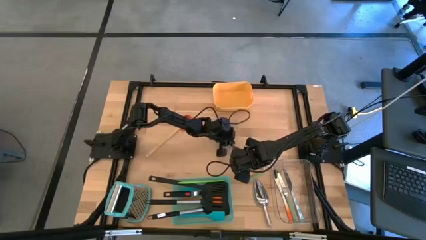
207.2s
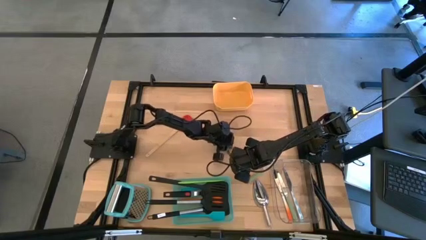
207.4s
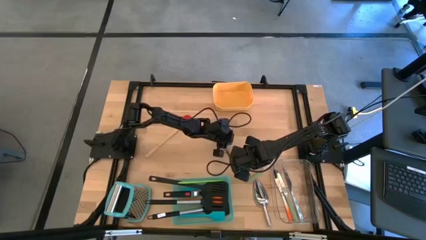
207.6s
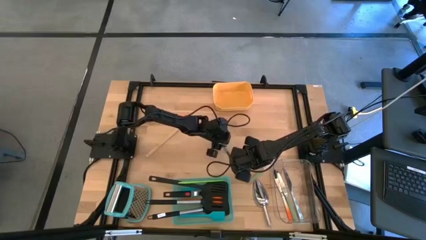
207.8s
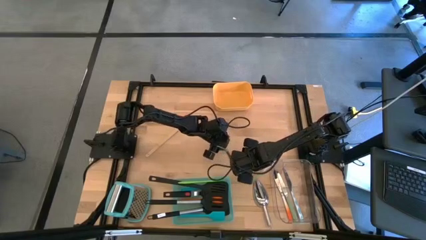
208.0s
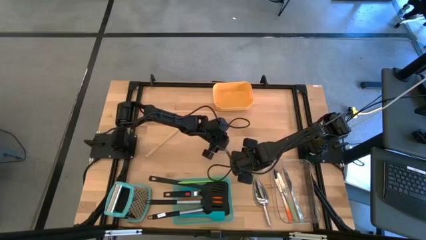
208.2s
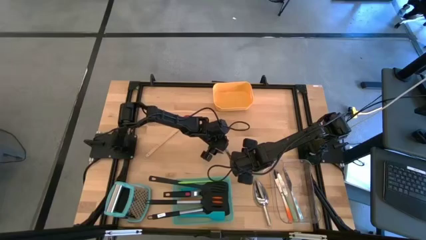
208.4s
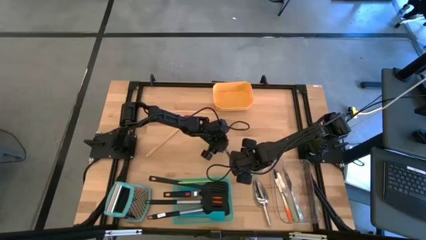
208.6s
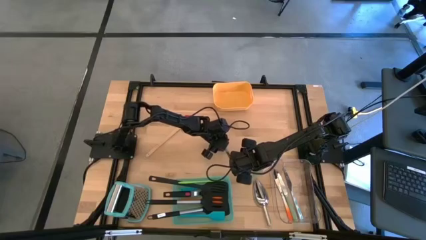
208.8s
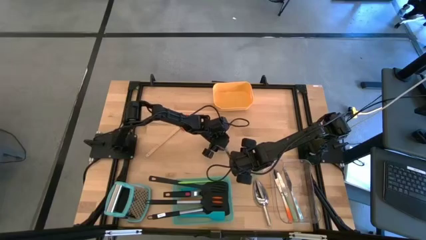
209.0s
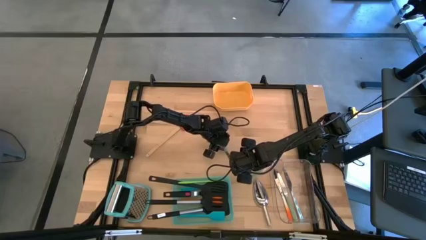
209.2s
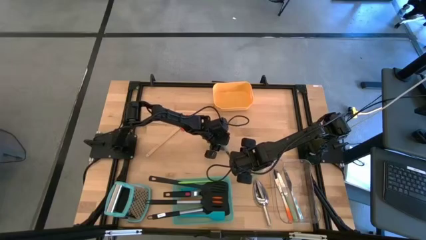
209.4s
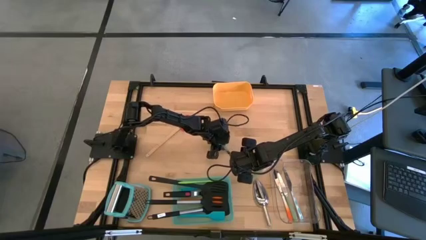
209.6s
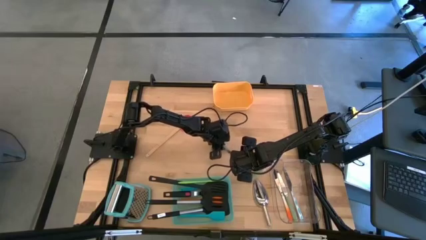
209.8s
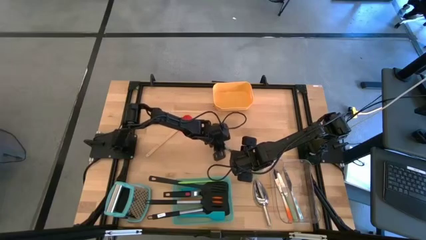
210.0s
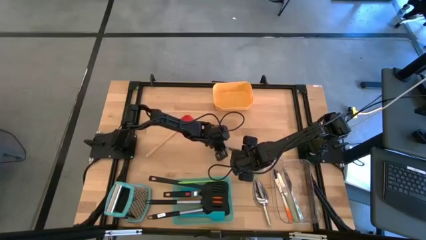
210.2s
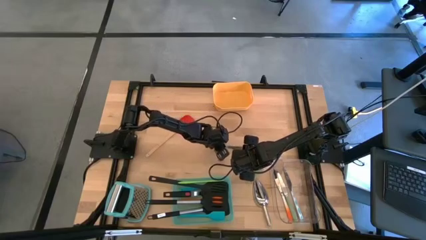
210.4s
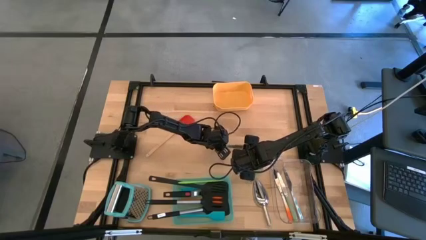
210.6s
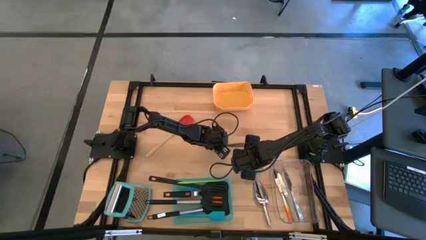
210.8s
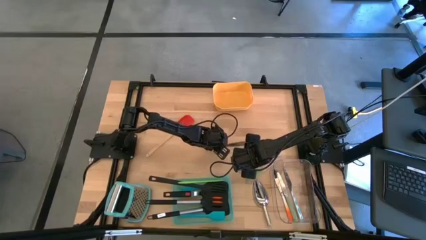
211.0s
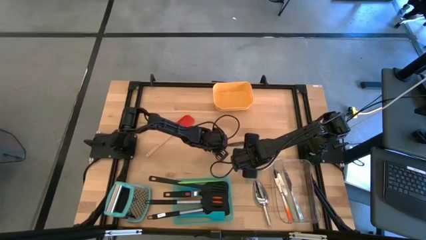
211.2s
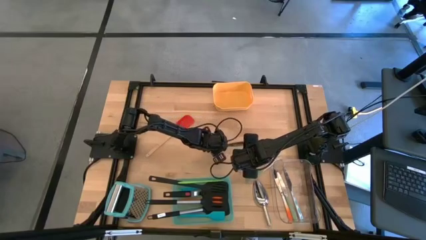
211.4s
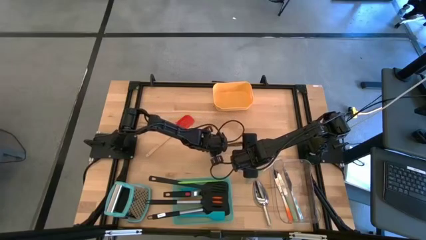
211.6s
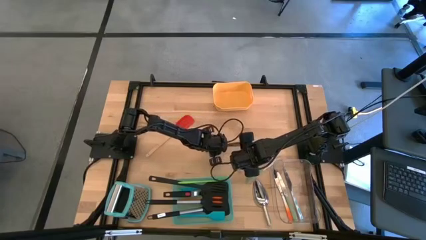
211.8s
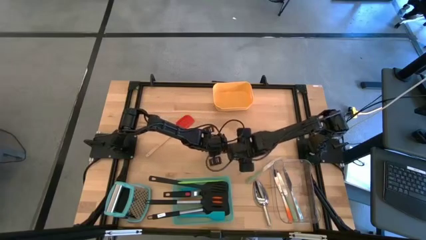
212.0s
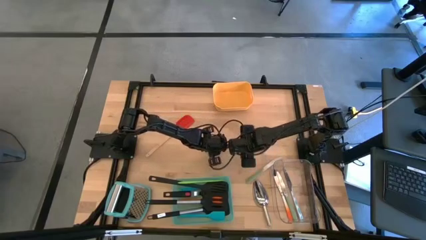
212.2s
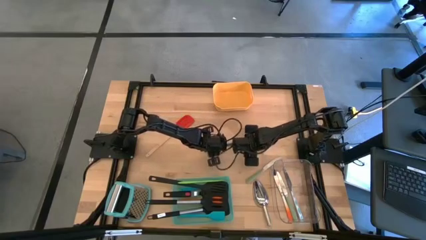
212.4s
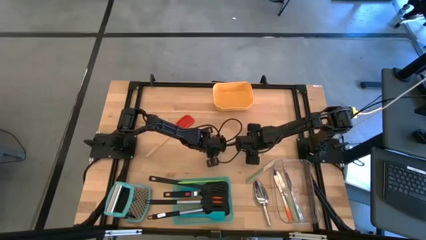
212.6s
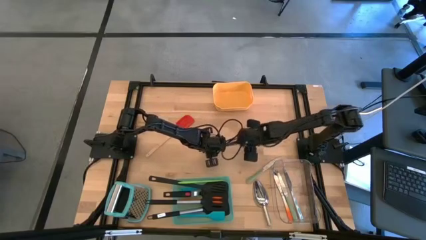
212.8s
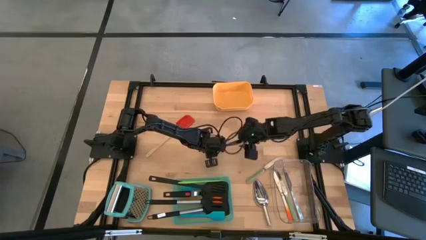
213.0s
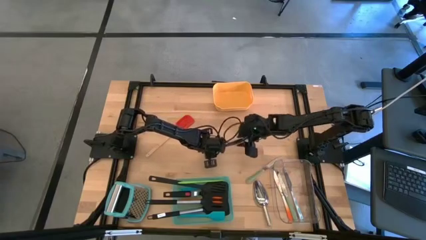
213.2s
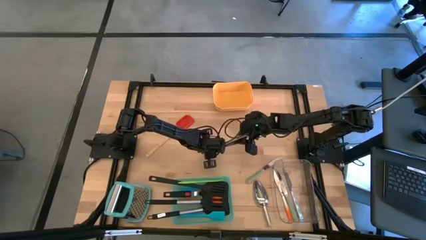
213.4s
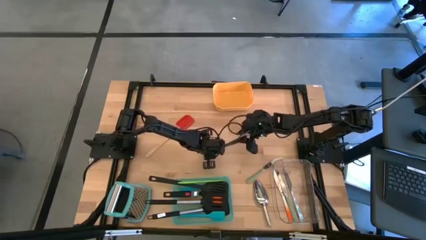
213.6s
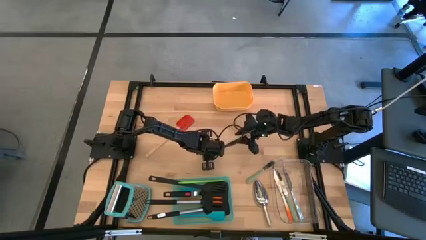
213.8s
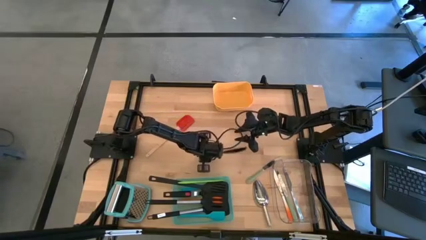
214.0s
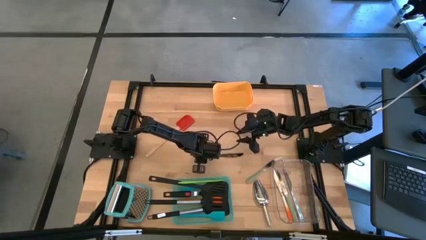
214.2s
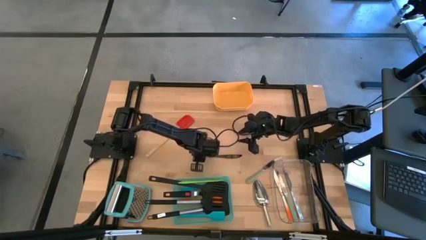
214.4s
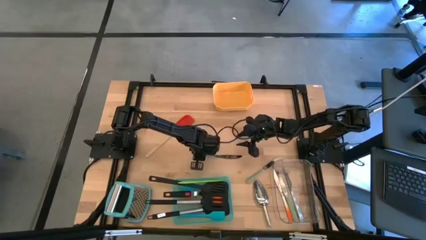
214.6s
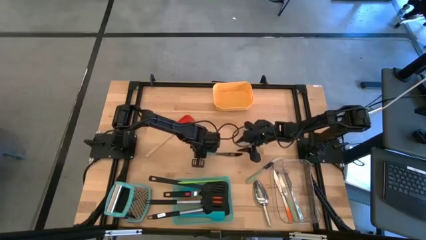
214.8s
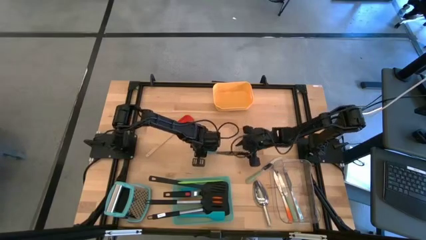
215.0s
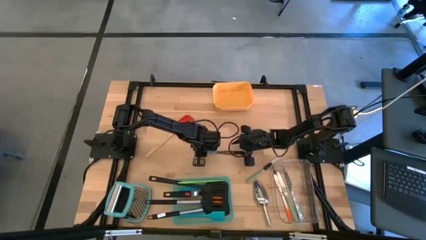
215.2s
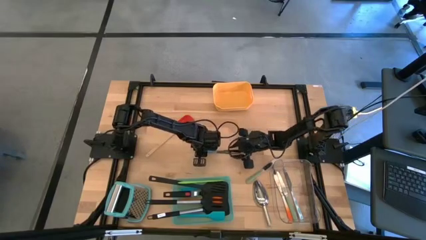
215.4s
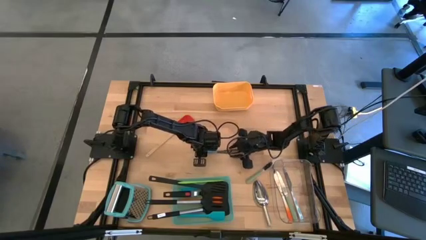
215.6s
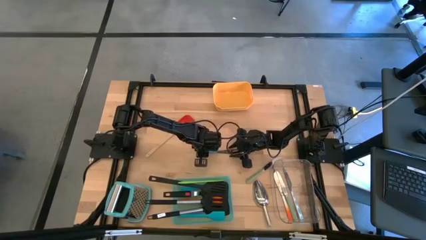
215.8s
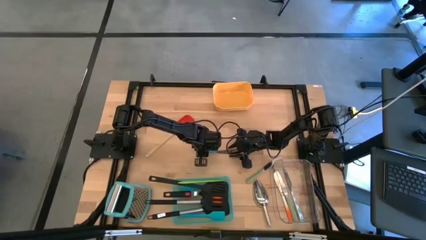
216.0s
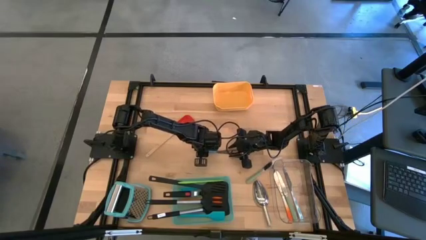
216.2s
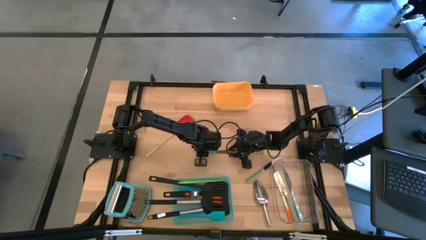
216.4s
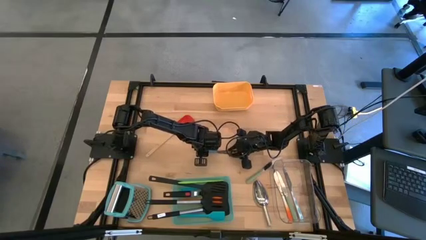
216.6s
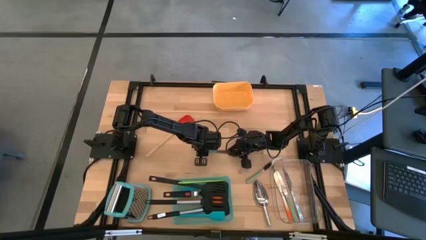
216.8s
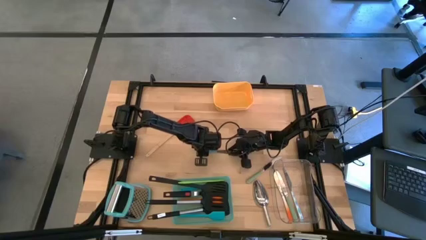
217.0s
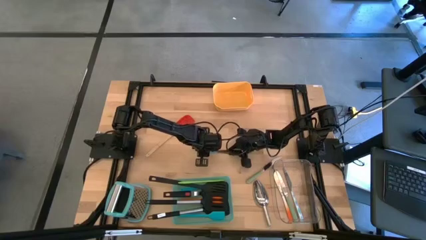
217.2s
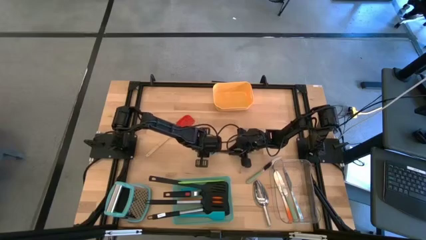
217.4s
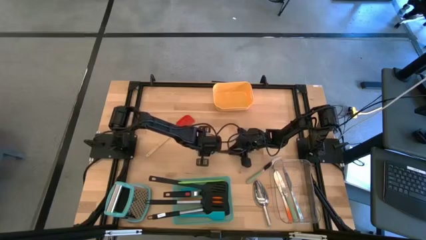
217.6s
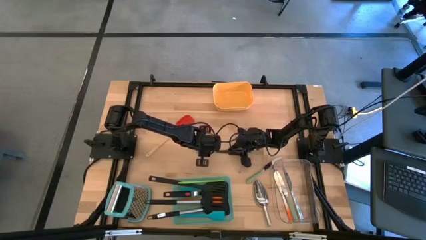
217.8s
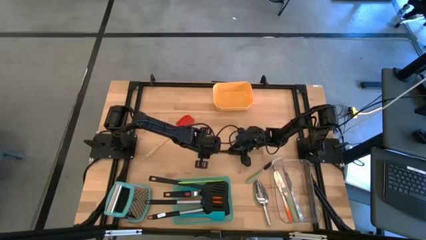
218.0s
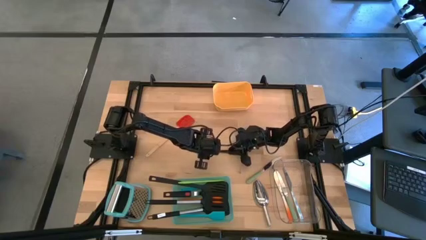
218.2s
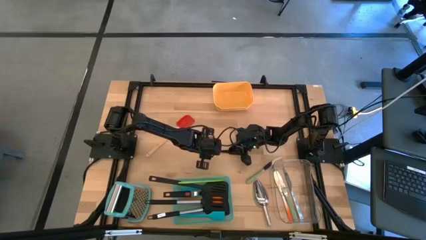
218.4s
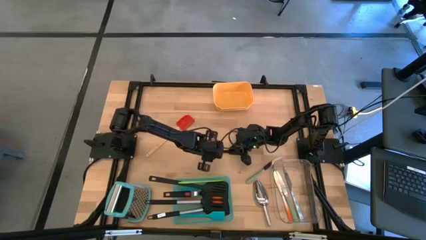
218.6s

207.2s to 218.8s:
Task: Pick & Place Kitchen Items
Put the blue table knife into the transparent bin

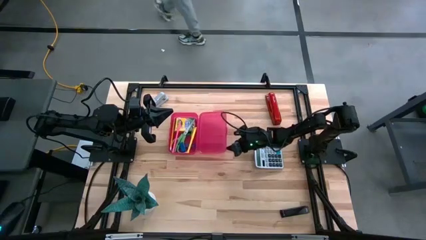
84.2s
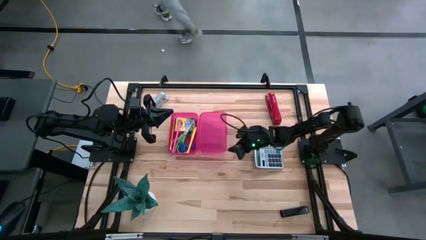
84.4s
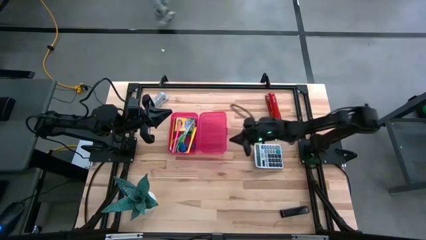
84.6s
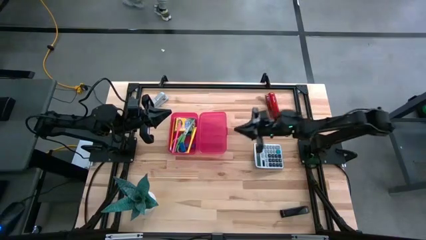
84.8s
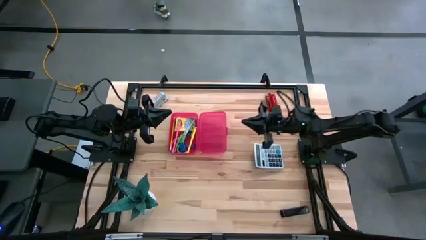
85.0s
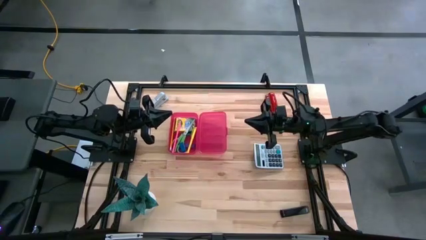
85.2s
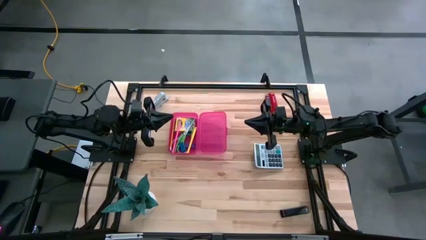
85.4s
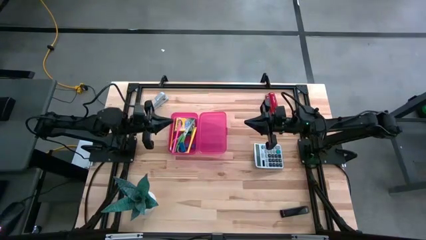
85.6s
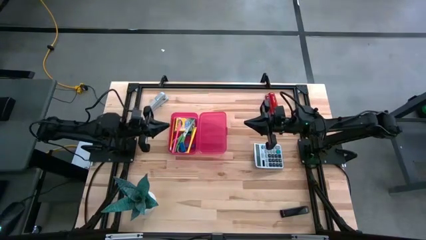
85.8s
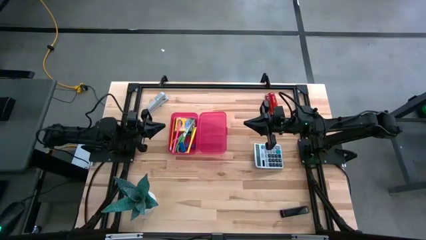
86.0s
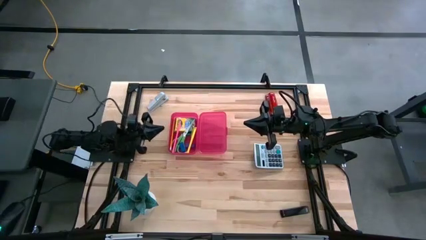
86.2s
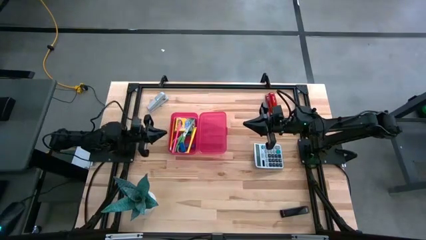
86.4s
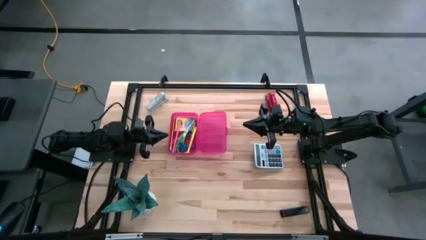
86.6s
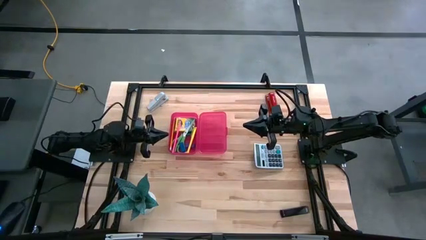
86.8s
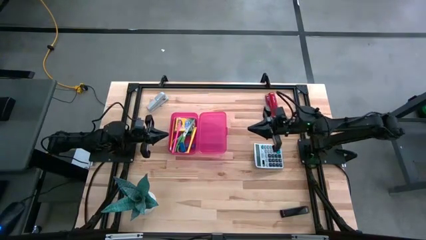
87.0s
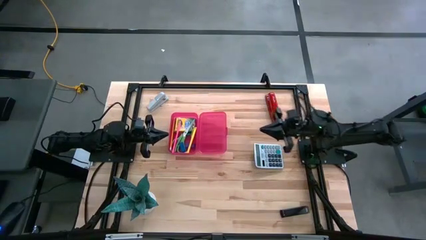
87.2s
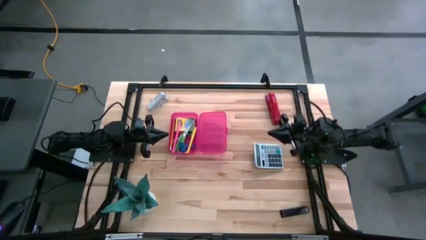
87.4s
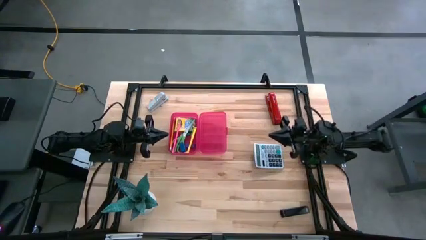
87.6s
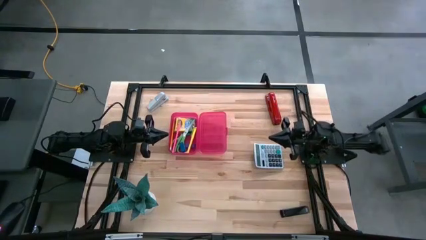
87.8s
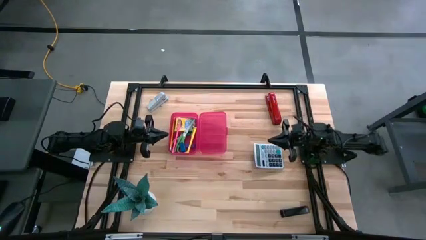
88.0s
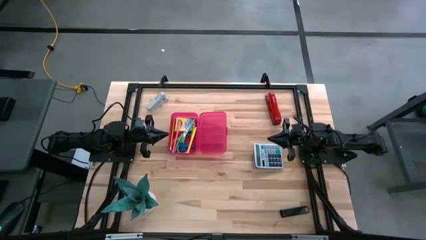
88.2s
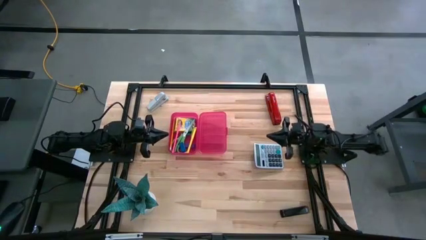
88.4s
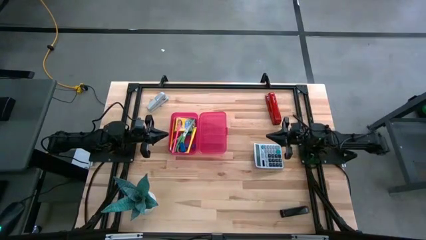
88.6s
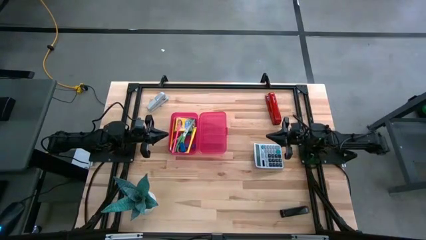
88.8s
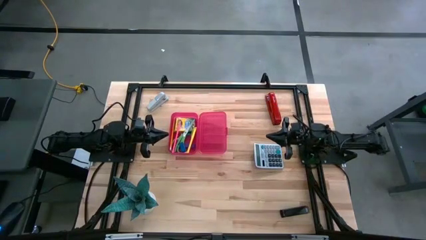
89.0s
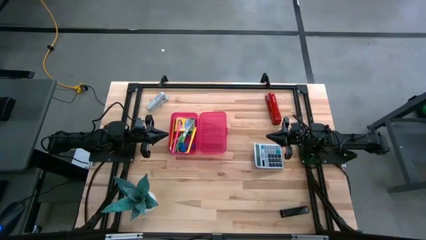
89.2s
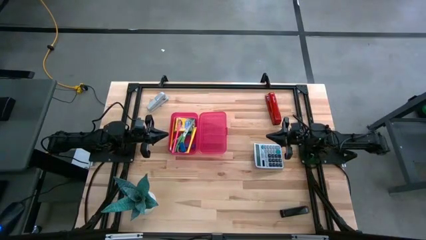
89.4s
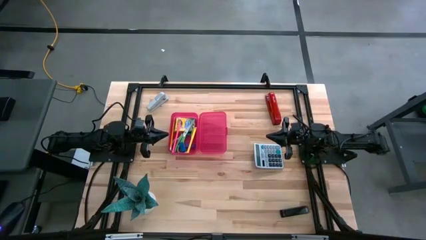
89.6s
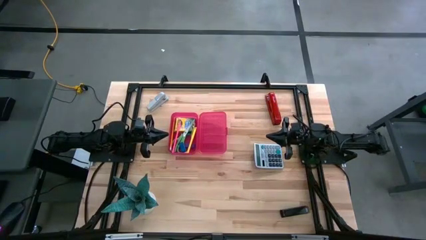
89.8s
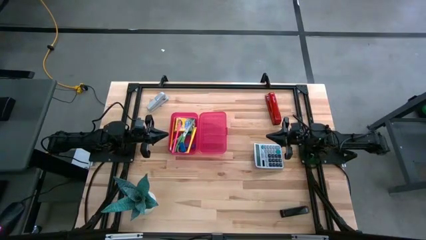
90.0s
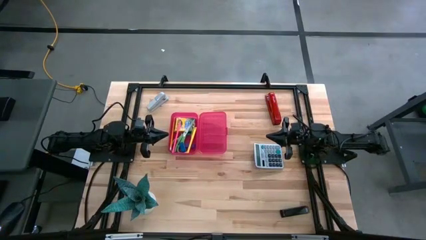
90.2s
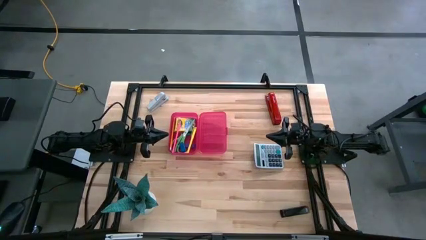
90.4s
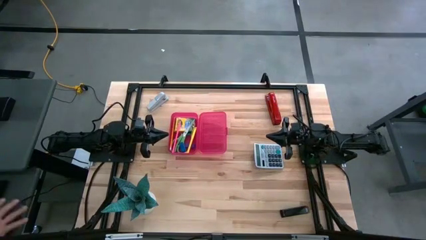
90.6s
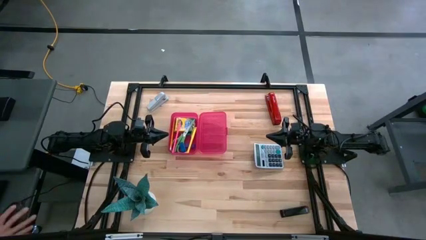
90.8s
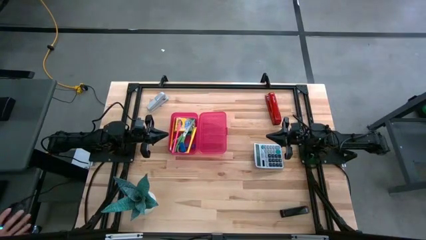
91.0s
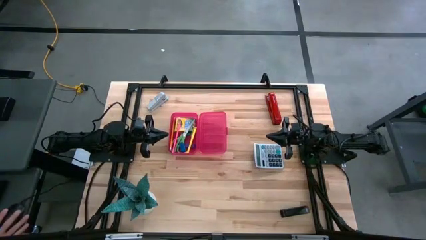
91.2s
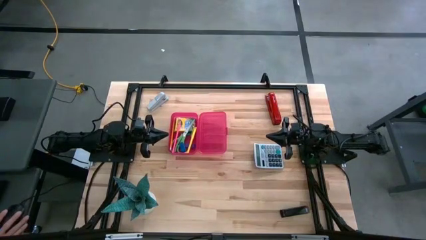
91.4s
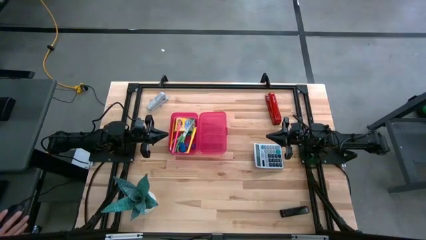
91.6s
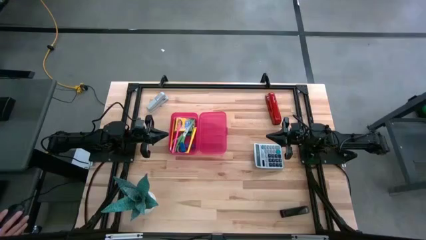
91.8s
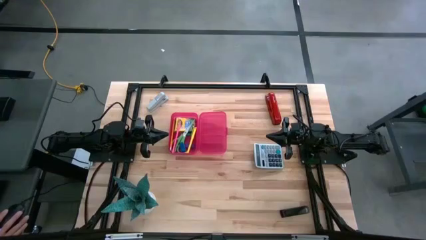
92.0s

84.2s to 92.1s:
Task: Pack school essentials
Return to Home Position
